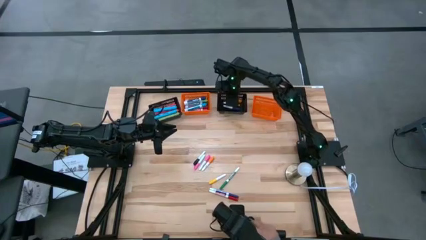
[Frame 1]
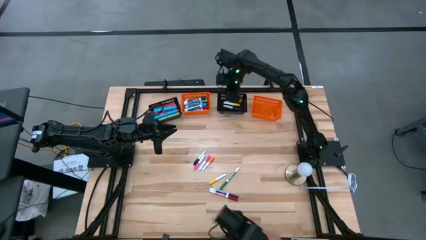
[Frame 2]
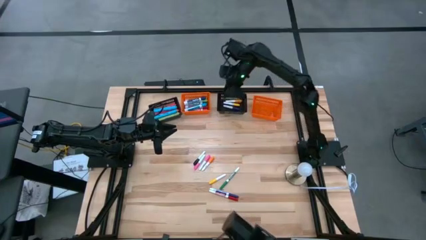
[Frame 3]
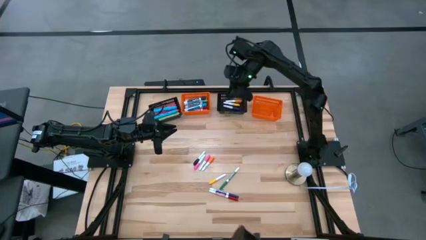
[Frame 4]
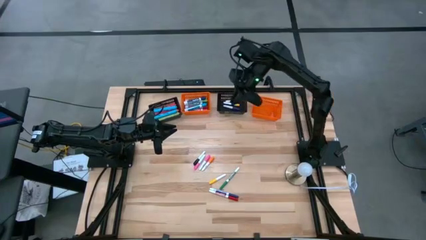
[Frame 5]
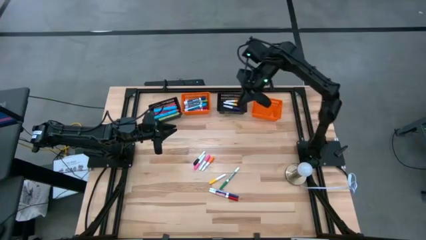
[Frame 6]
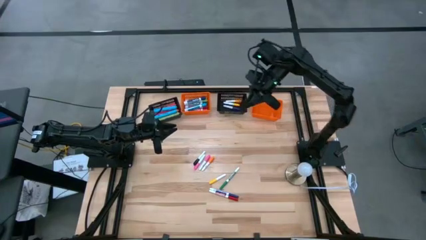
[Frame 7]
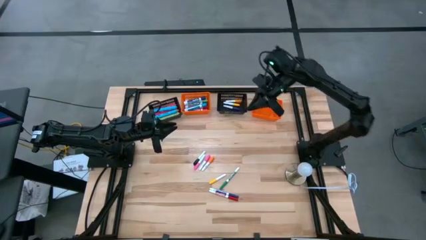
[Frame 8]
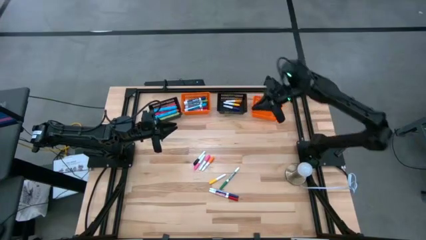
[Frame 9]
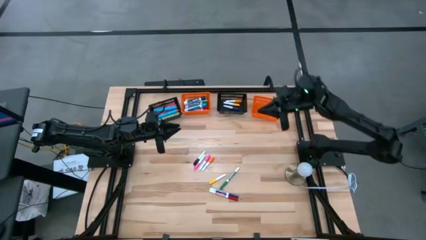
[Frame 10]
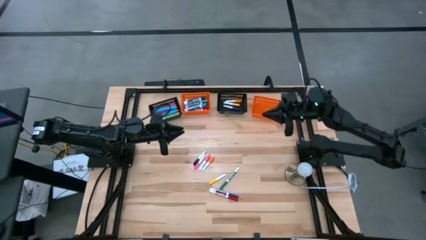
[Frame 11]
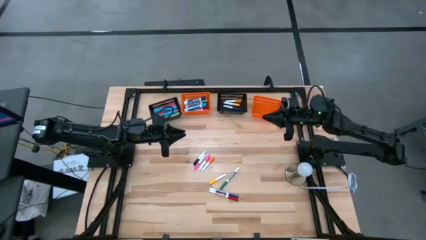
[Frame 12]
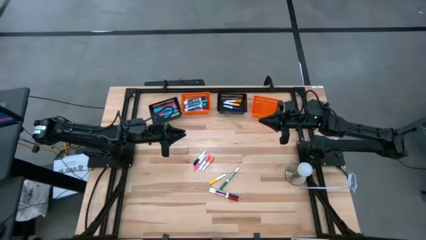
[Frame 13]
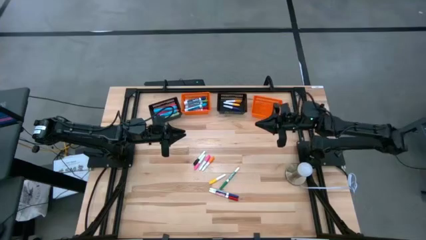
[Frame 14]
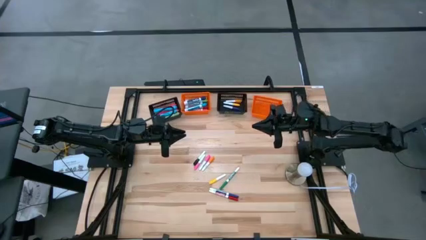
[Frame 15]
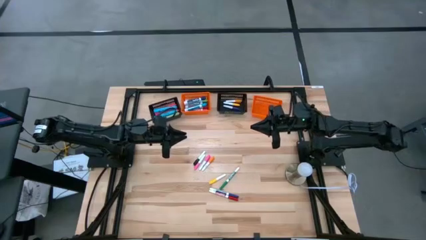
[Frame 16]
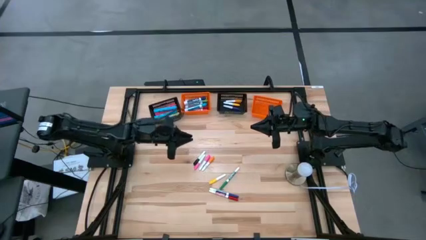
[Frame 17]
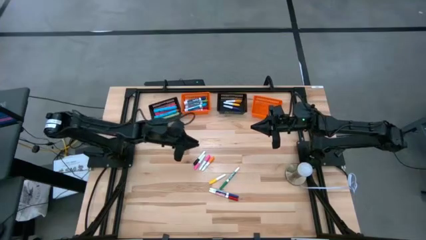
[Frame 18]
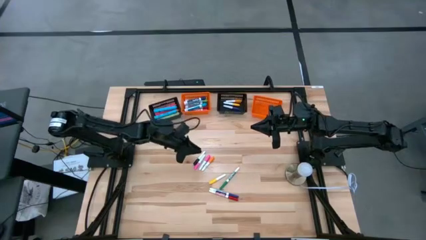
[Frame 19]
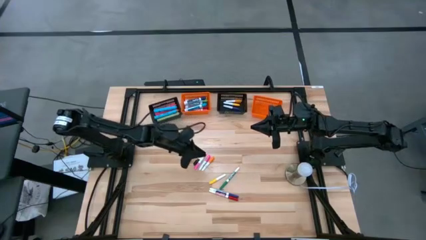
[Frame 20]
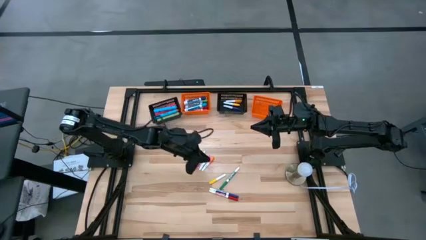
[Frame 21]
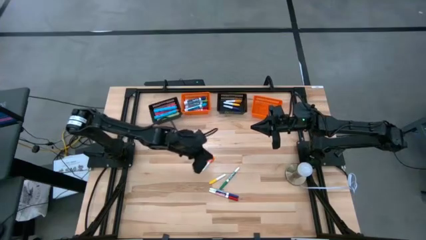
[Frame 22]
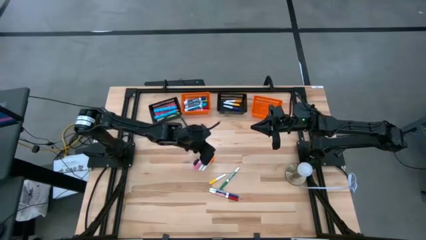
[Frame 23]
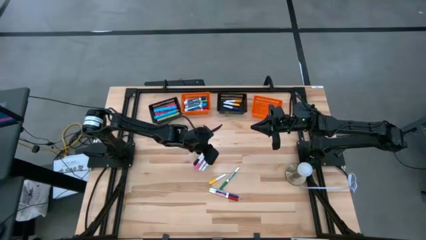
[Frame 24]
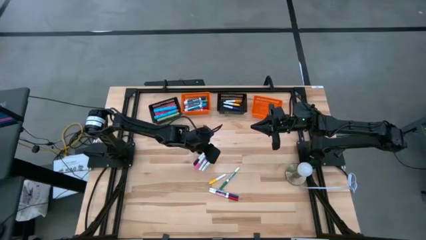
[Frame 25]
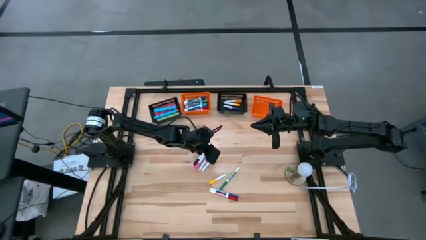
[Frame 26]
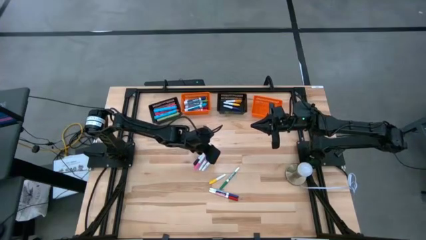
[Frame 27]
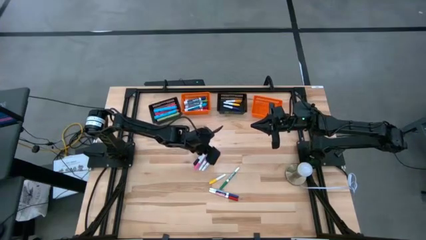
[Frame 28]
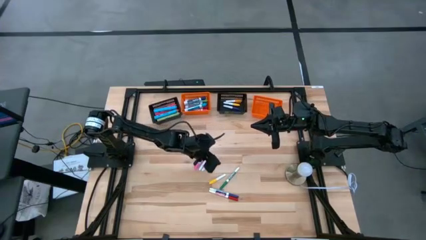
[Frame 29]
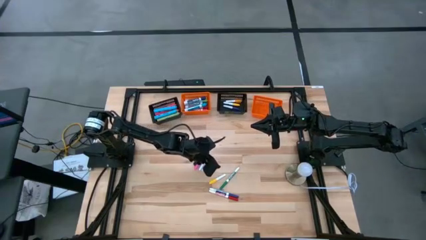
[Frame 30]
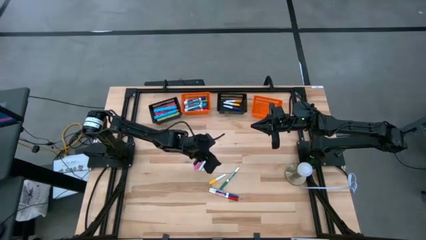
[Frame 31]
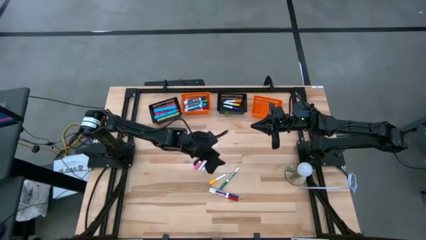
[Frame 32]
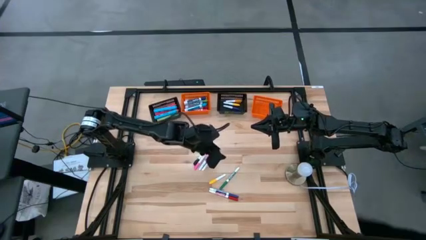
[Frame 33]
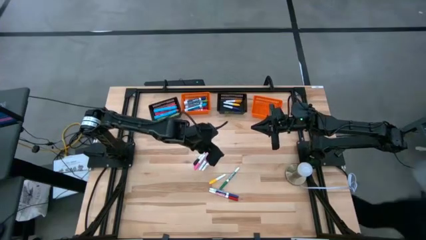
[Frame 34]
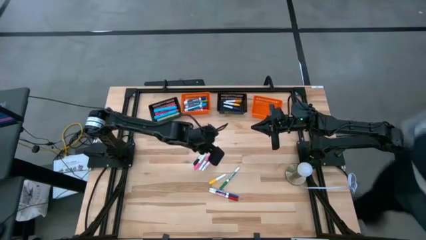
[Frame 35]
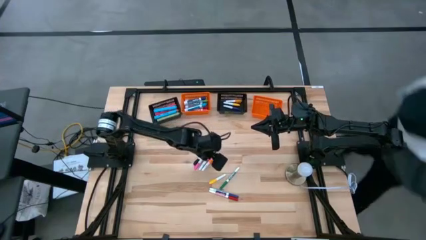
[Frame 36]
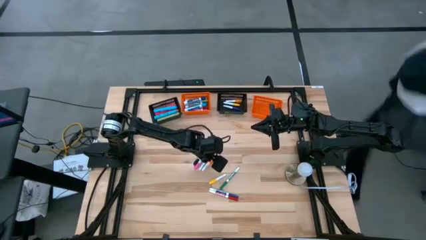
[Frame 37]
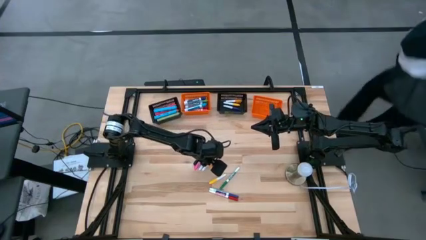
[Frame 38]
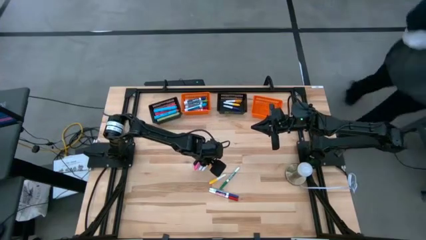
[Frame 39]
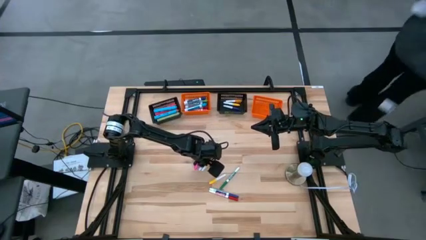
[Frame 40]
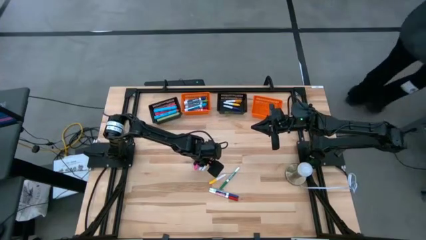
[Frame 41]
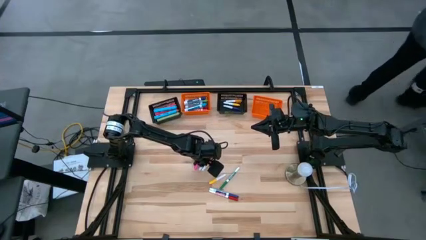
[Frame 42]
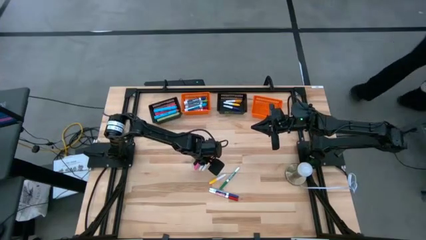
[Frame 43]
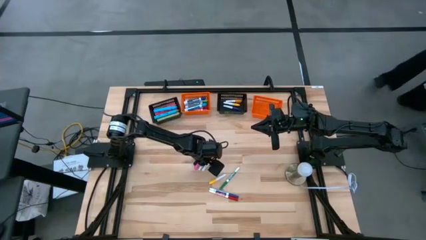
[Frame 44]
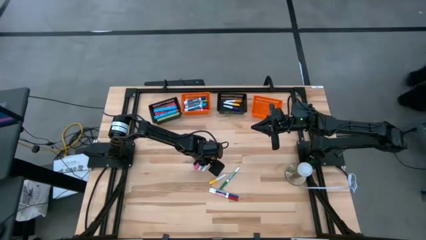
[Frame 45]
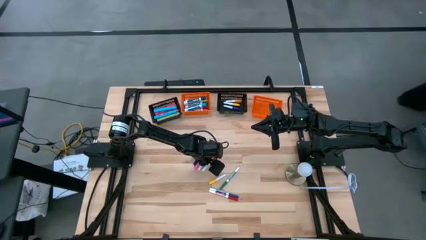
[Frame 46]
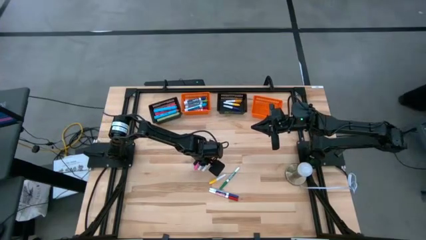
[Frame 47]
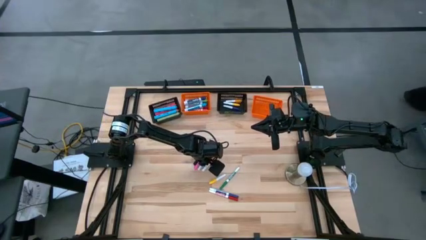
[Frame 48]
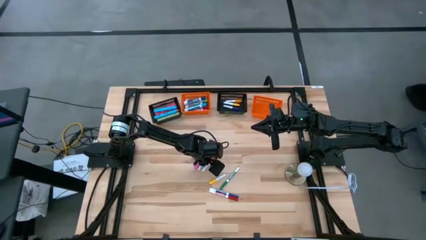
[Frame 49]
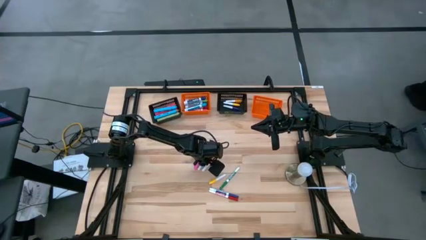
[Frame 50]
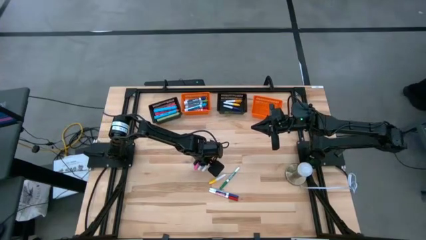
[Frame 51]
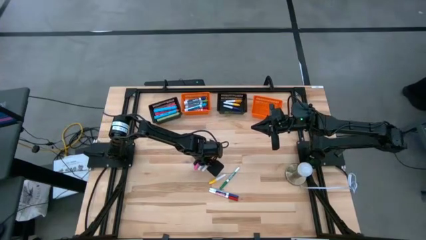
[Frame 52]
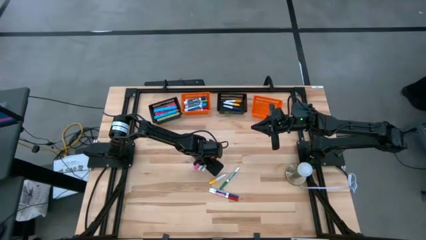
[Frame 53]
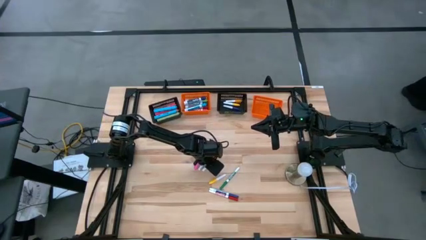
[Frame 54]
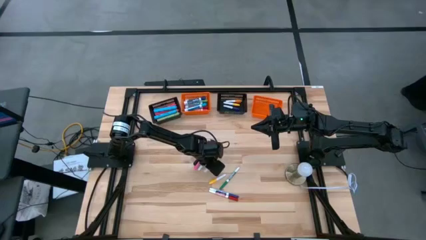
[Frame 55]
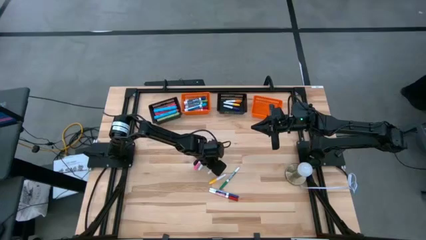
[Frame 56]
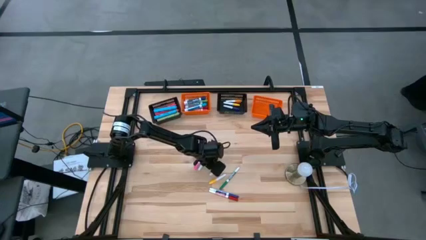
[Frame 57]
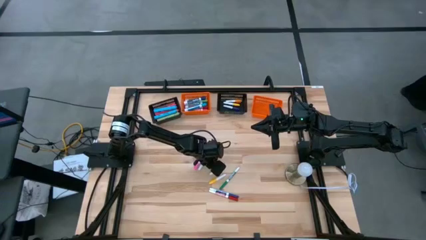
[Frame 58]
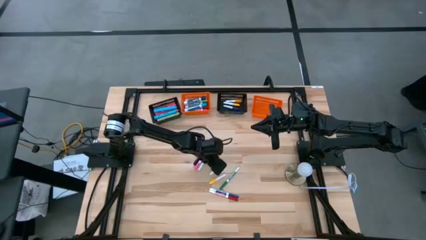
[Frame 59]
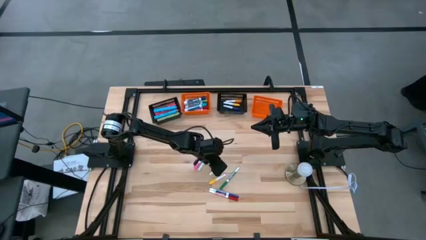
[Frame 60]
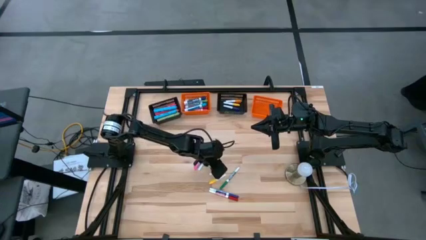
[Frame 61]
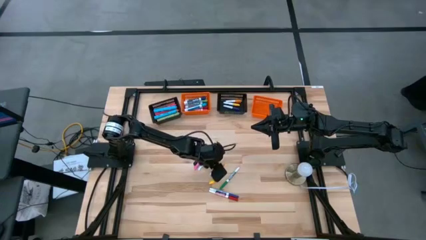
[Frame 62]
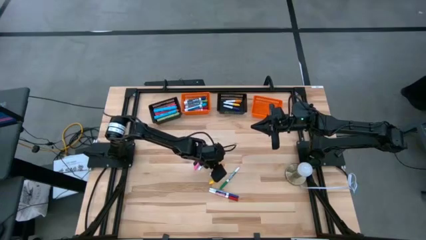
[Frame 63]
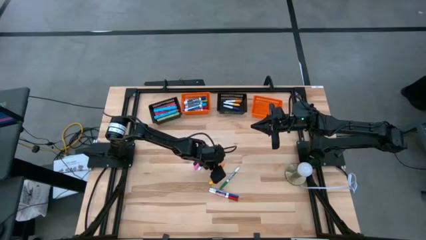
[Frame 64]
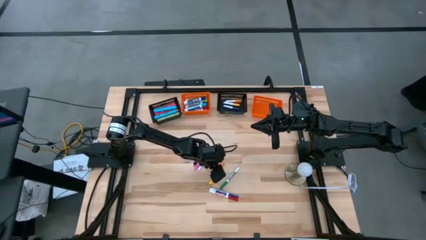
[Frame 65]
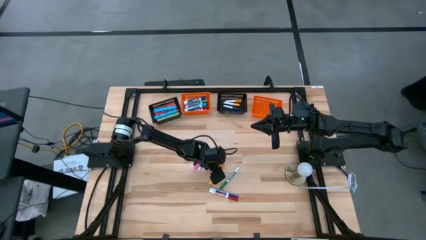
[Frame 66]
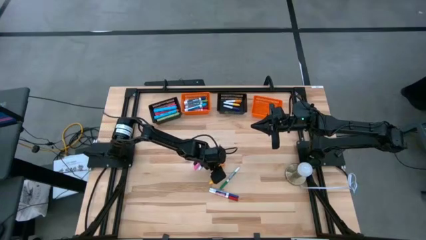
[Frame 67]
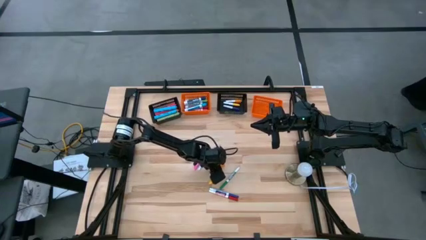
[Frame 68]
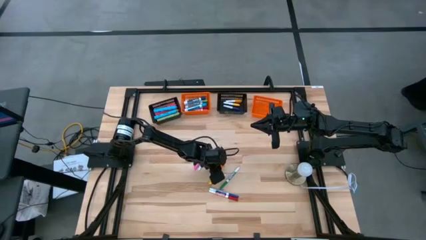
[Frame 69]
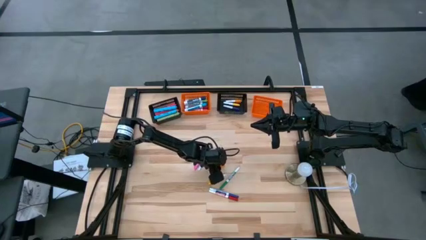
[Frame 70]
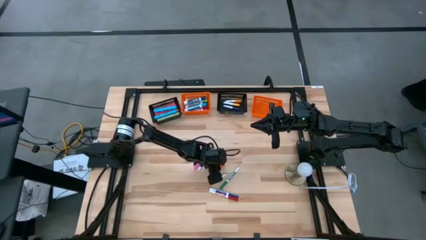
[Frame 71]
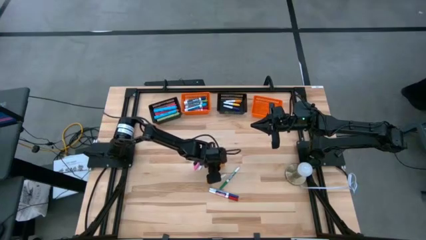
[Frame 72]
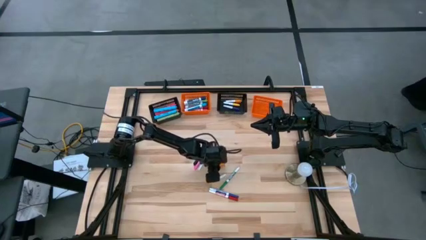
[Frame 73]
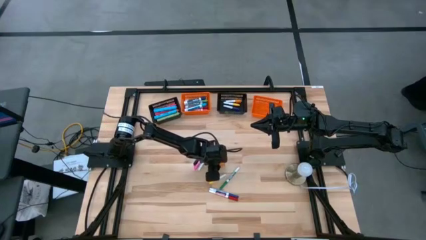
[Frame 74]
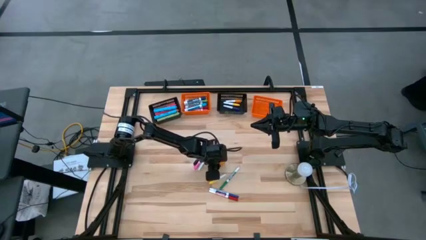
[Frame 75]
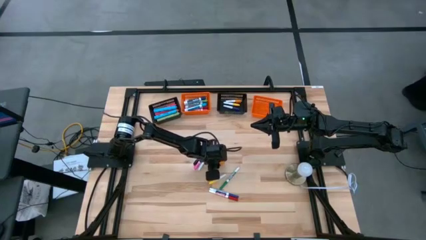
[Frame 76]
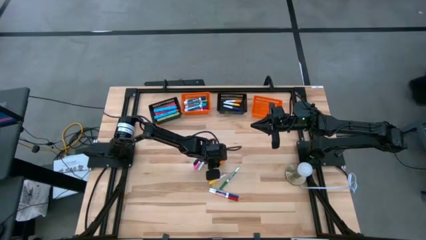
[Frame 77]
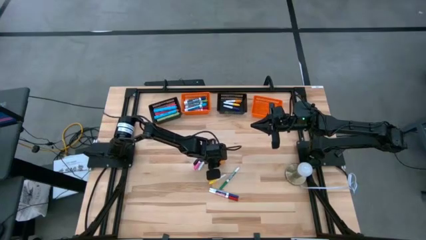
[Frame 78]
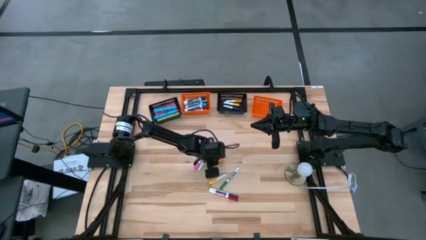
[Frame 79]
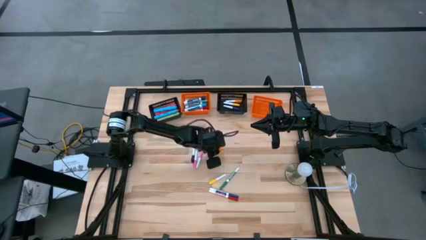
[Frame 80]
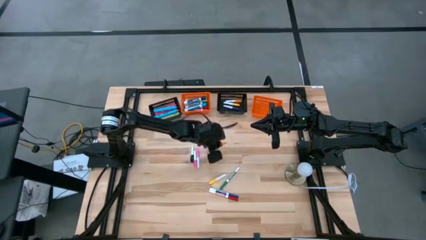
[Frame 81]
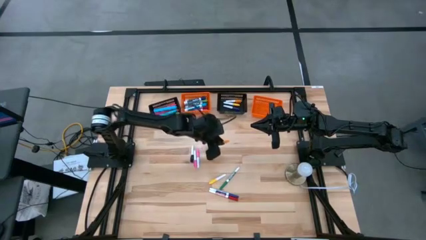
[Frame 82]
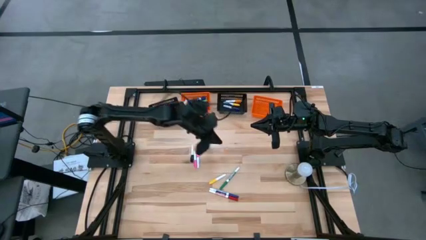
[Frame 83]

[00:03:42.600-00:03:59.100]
Task: Pick & Place Markers
Put the orange mini highlighter into the right black bin
